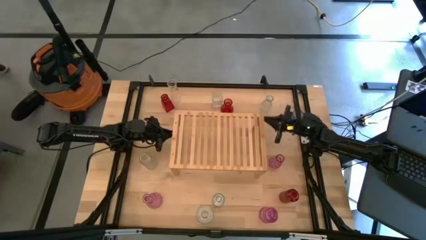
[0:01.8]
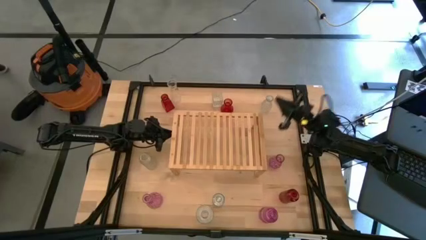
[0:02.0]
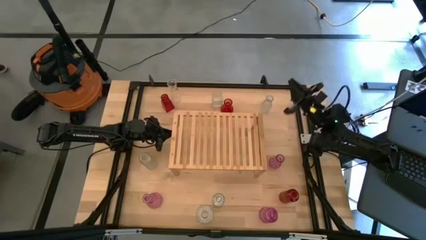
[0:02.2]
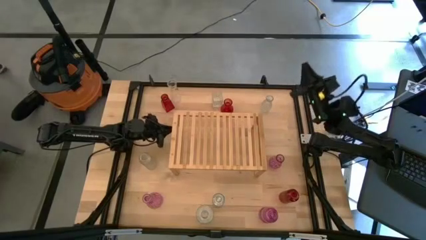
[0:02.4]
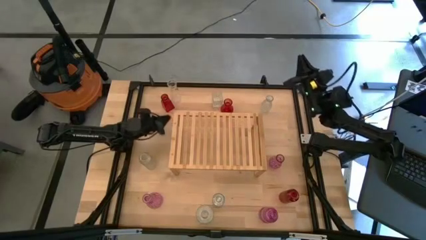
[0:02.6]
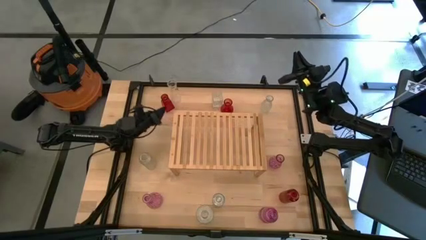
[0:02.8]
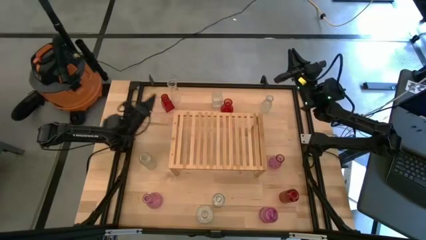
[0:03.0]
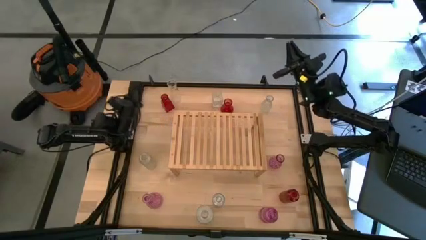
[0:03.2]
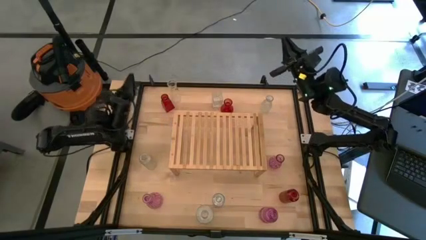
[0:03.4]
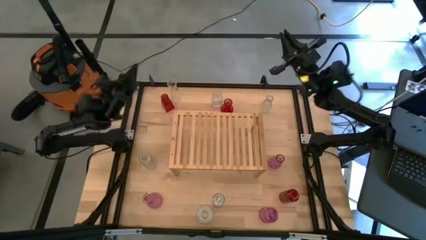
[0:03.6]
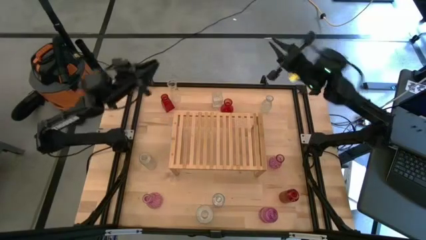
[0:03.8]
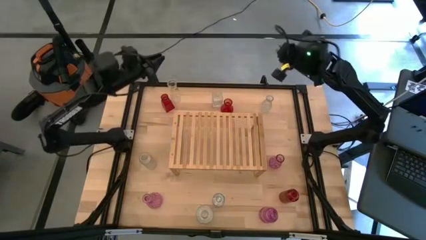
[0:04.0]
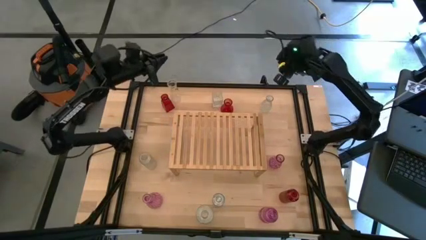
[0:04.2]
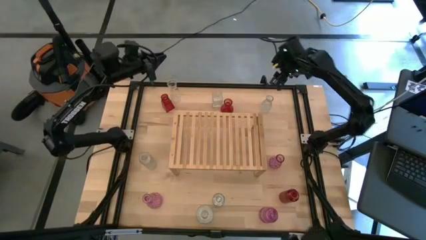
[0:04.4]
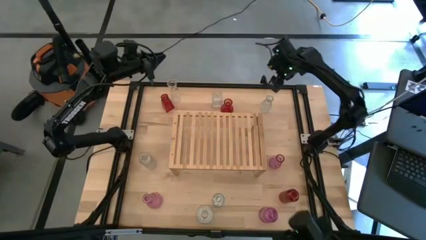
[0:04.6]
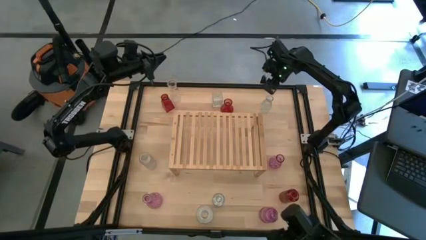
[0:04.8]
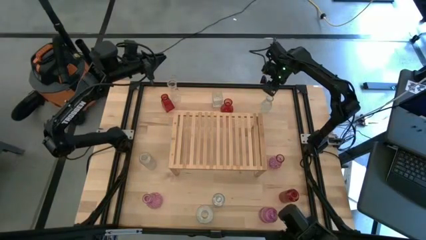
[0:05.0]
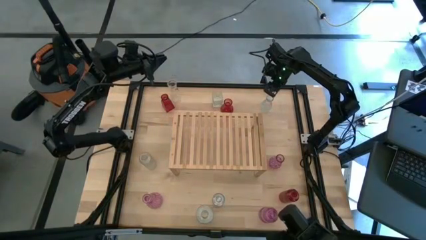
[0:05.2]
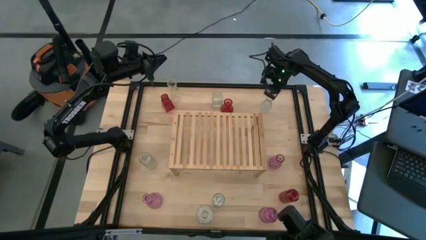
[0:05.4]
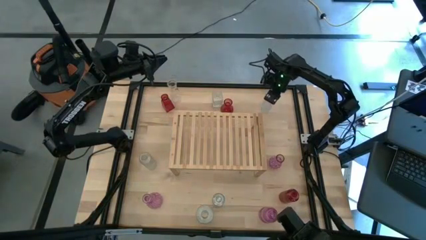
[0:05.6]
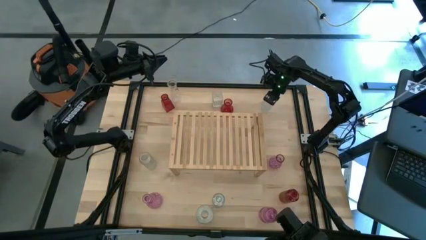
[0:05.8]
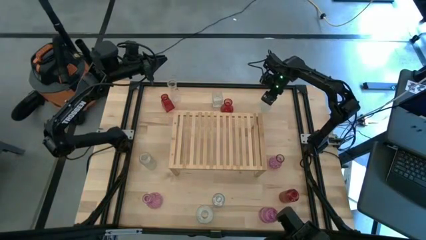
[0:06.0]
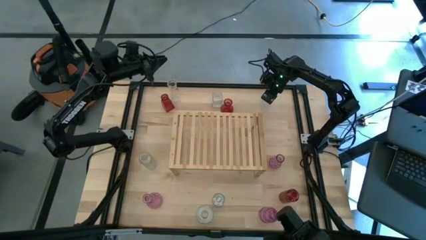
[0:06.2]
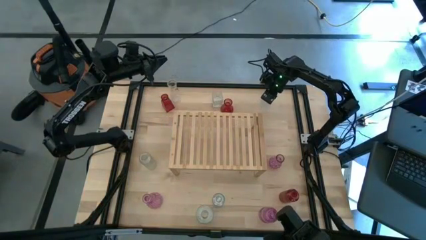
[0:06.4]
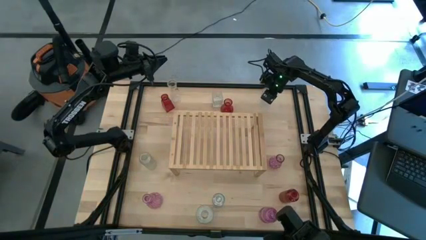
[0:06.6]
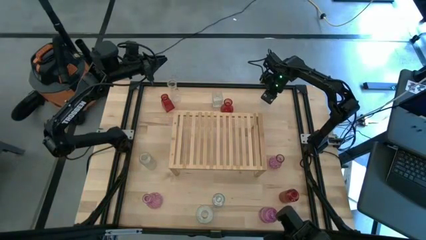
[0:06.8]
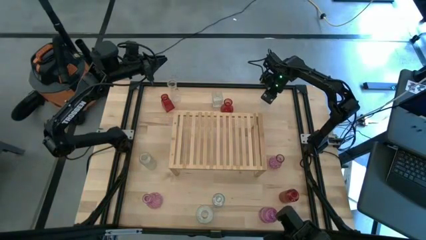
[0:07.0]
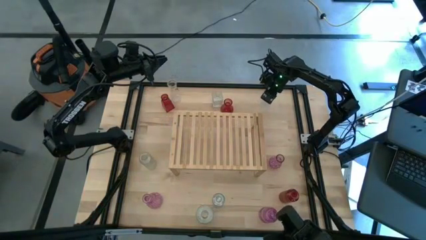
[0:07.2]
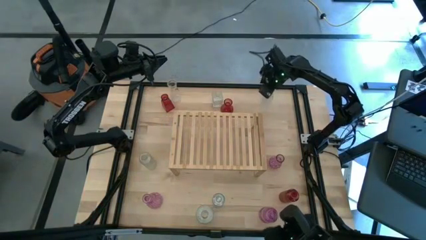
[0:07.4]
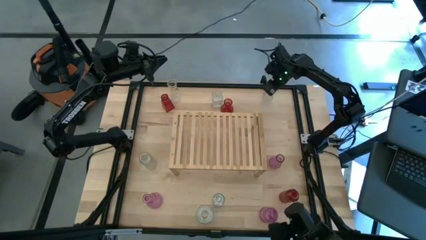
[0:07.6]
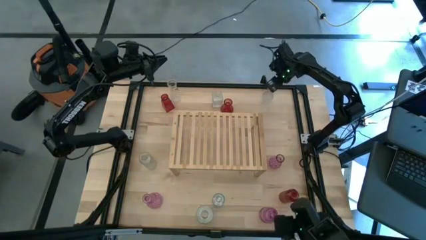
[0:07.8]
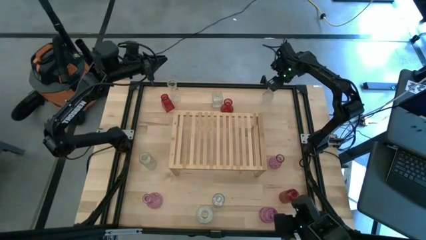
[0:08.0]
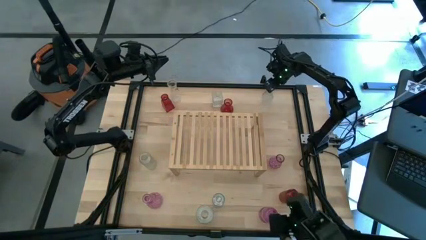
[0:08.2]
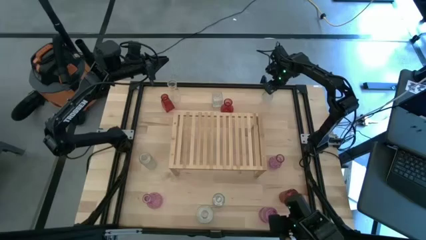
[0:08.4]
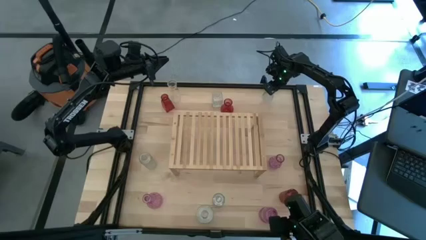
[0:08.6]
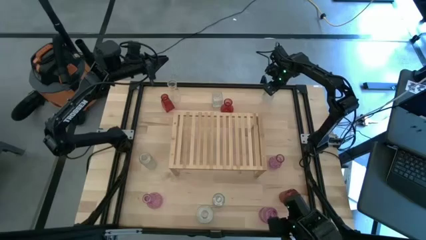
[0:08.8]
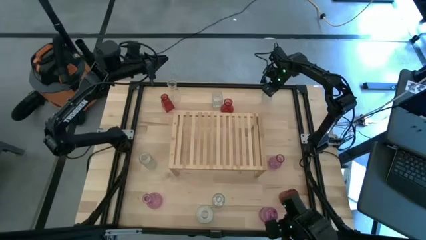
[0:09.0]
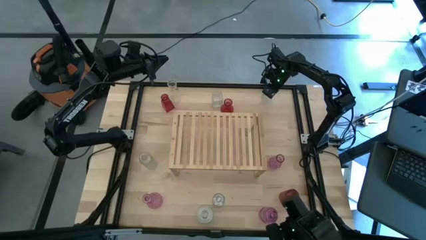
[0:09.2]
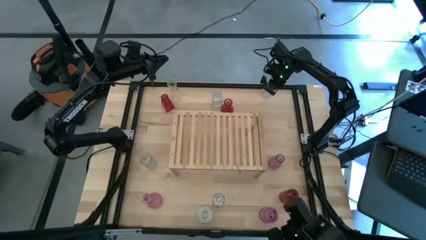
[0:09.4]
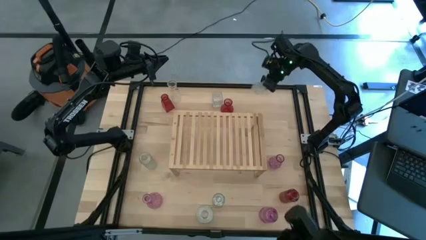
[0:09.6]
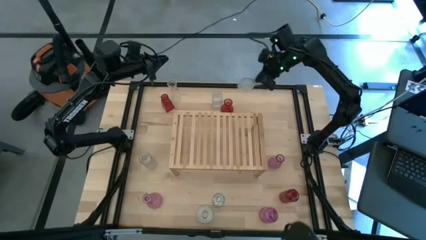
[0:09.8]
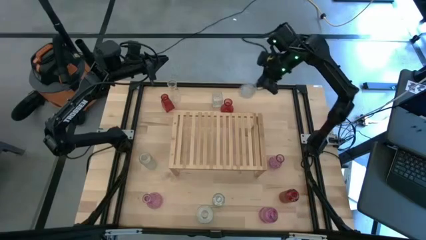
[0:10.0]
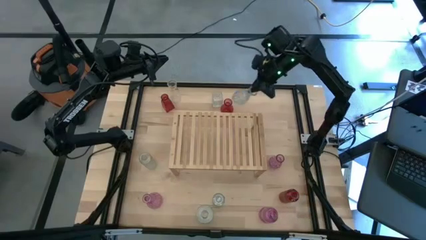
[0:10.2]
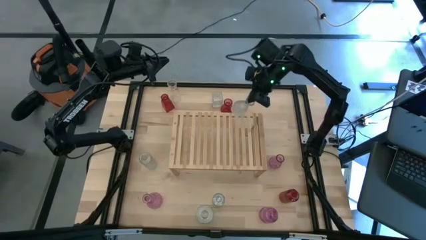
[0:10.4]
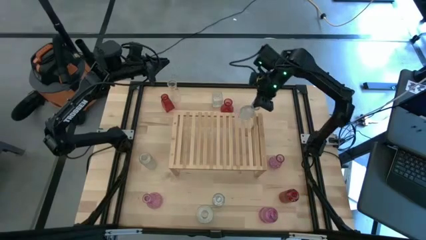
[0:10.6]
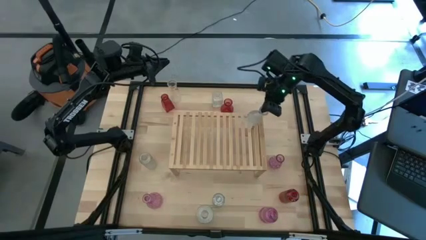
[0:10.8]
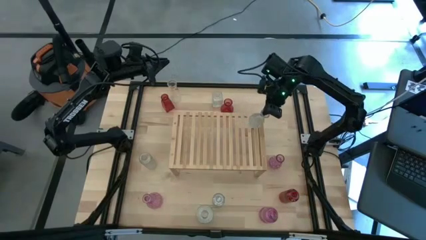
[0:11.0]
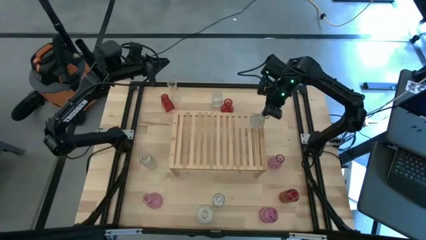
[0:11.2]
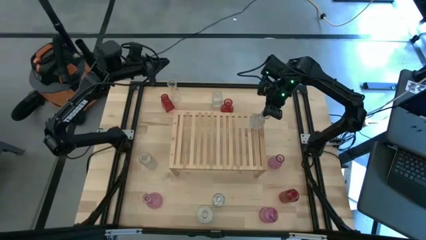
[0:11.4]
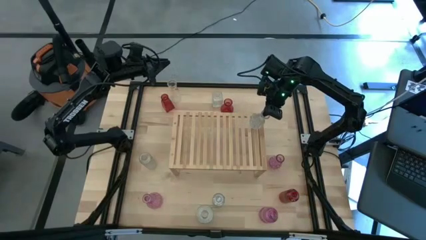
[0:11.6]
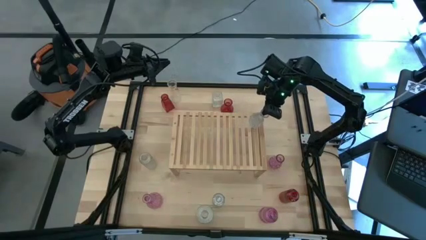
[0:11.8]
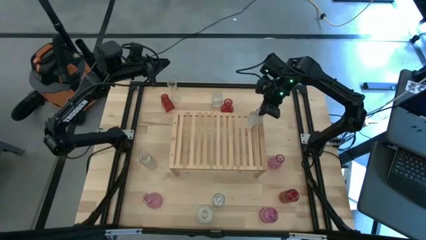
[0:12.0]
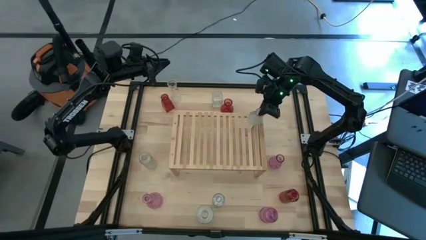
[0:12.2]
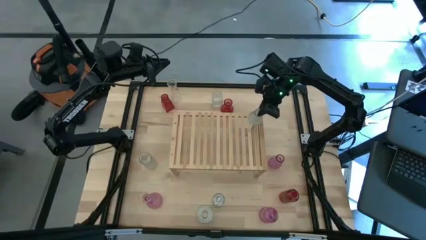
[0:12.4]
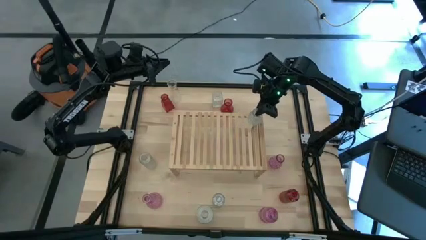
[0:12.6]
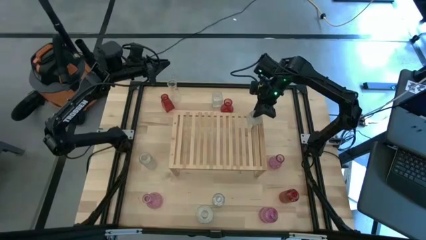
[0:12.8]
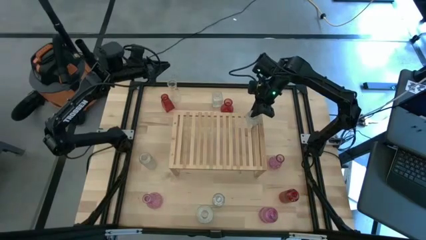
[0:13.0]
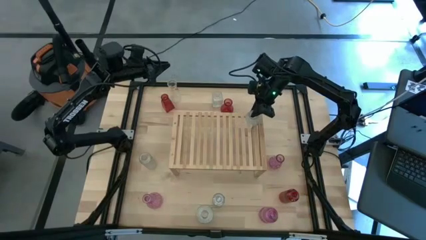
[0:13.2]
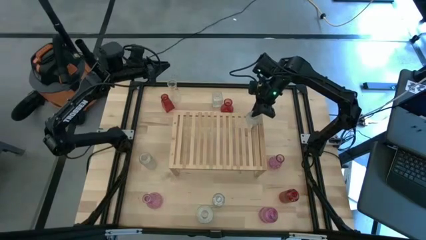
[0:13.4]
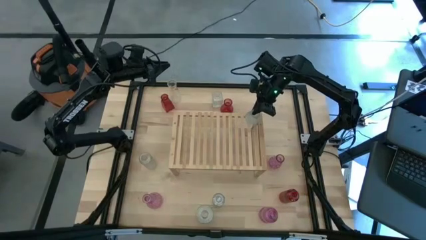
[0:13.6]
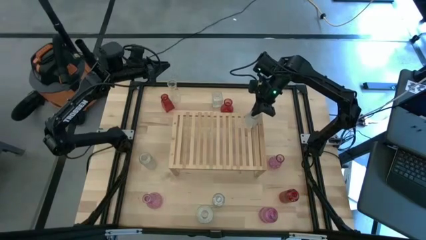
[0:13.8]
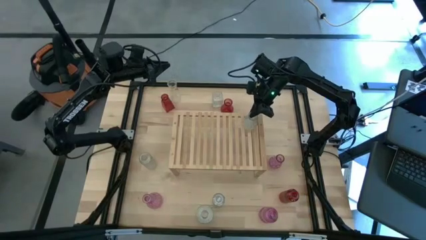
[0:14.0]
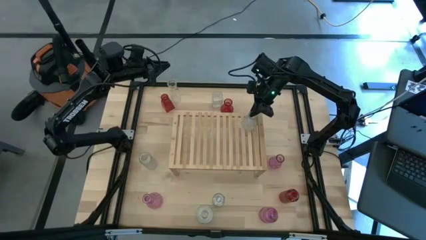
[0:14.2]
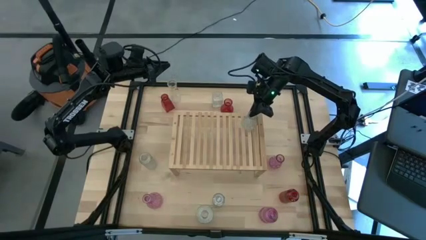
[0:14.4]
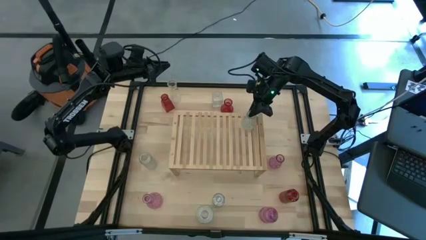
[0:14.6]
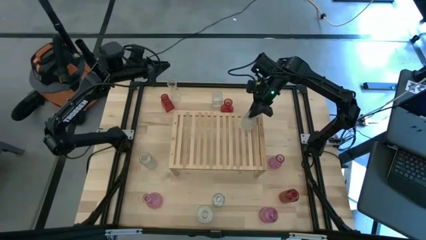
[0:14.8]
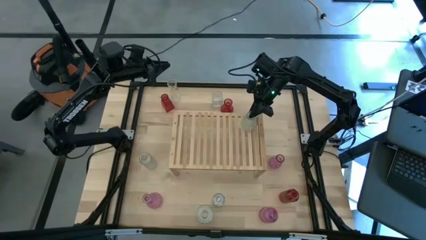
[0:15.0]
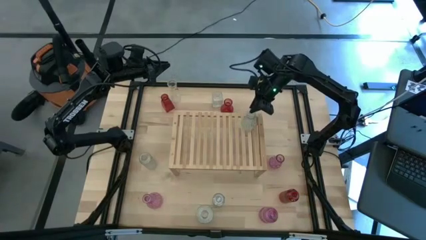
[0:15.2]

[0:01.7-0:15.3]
Task: sort vases onto shelf
Put the transparent vase on the shelf
